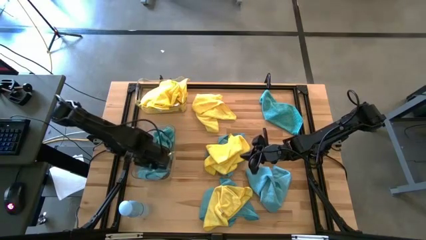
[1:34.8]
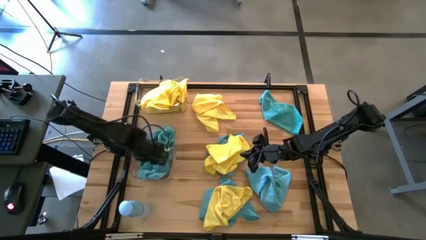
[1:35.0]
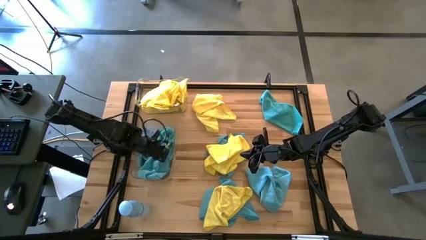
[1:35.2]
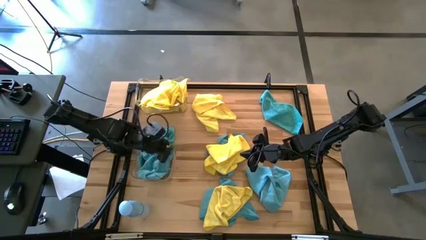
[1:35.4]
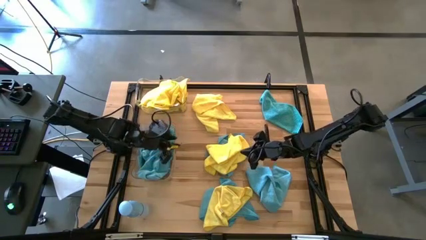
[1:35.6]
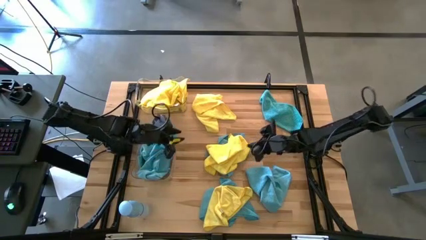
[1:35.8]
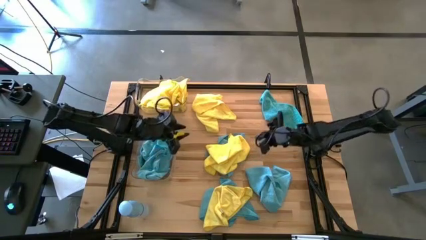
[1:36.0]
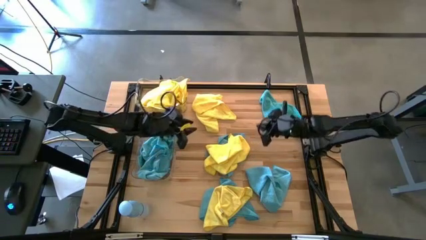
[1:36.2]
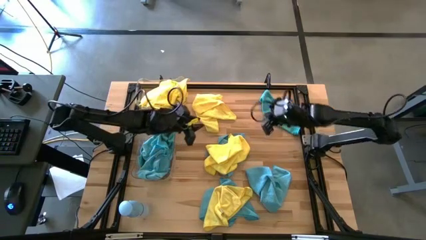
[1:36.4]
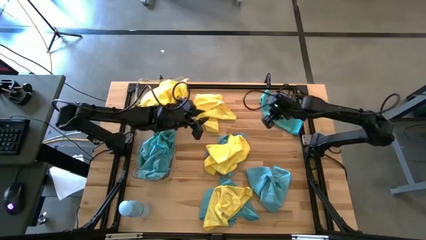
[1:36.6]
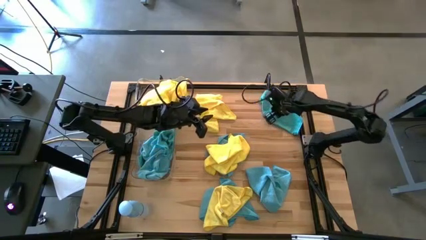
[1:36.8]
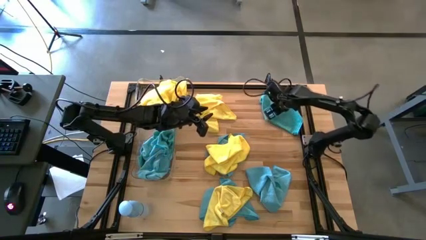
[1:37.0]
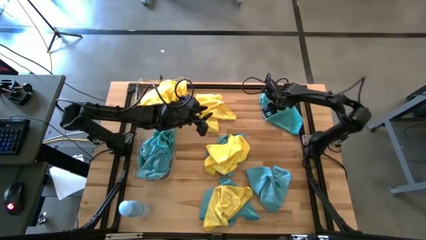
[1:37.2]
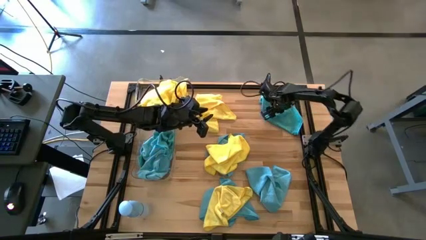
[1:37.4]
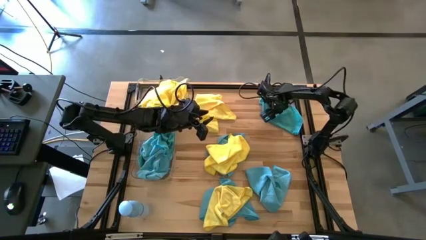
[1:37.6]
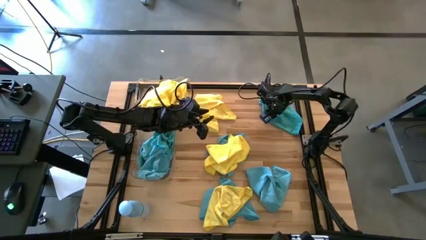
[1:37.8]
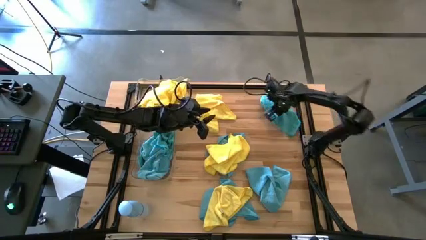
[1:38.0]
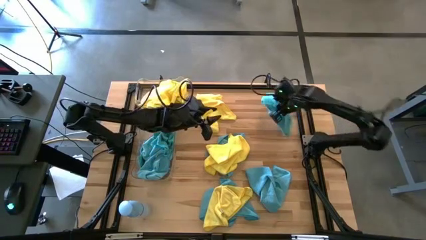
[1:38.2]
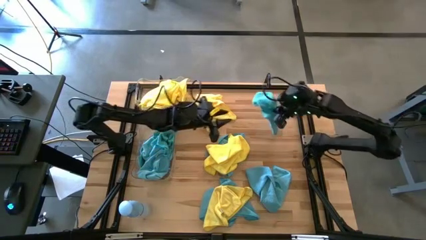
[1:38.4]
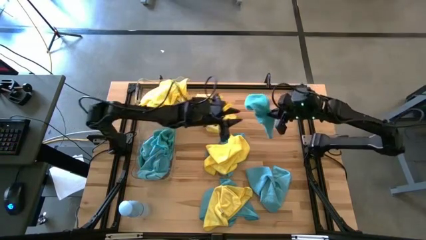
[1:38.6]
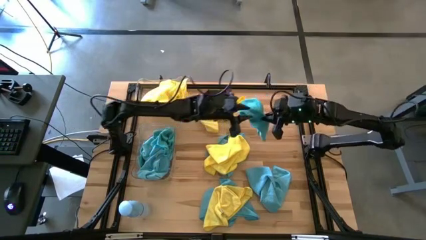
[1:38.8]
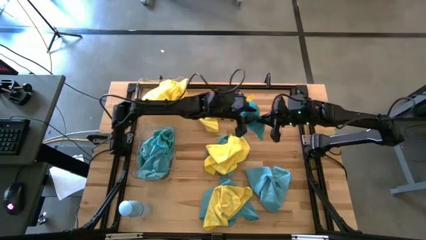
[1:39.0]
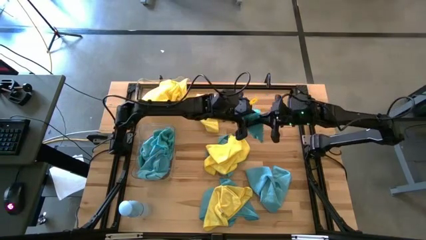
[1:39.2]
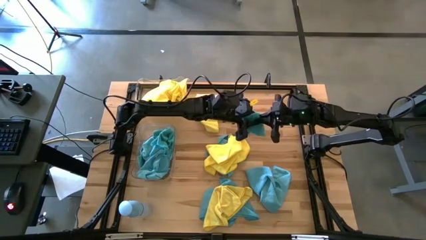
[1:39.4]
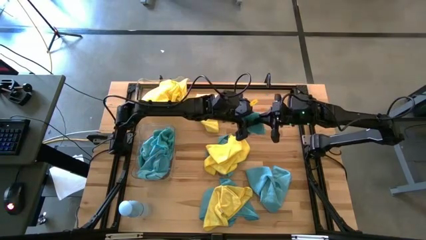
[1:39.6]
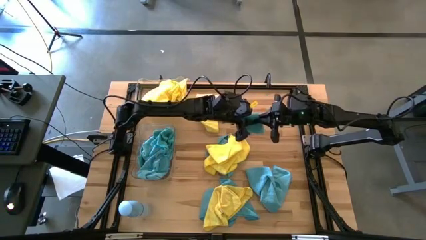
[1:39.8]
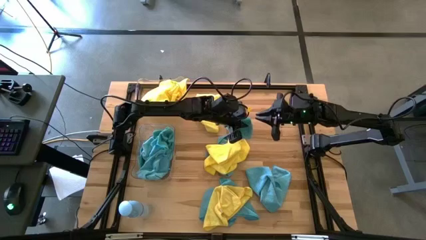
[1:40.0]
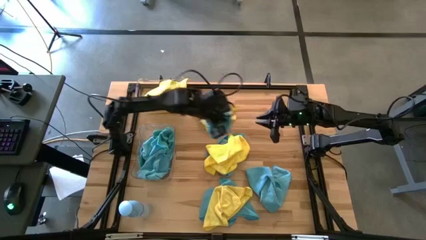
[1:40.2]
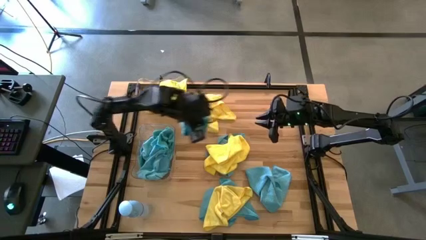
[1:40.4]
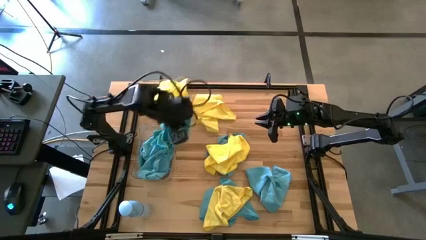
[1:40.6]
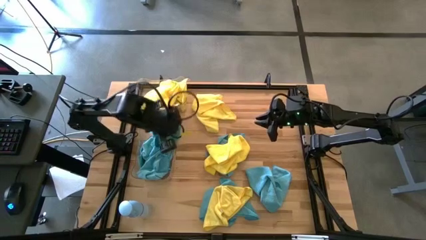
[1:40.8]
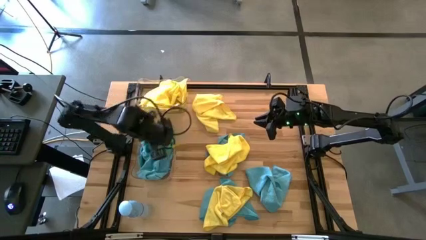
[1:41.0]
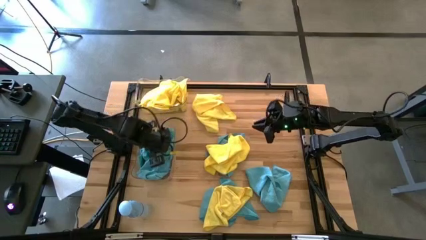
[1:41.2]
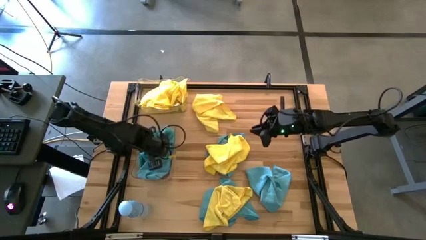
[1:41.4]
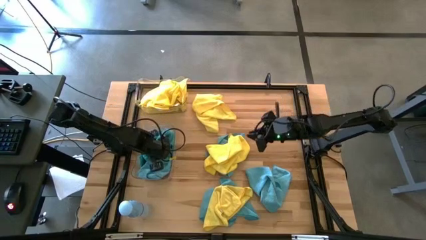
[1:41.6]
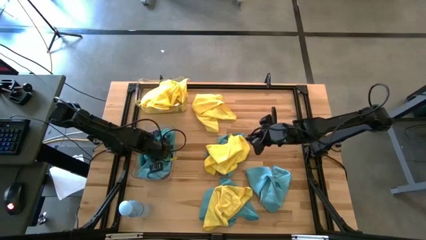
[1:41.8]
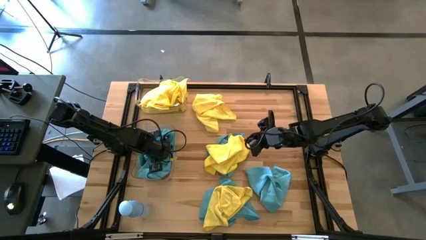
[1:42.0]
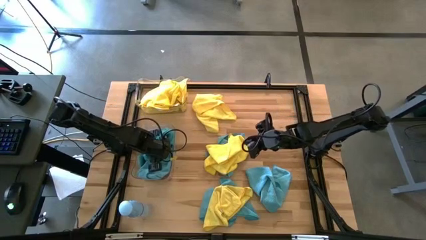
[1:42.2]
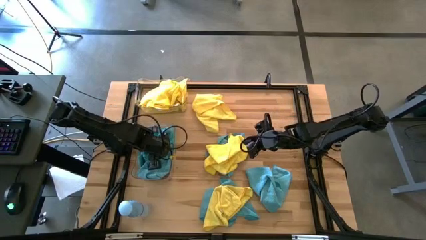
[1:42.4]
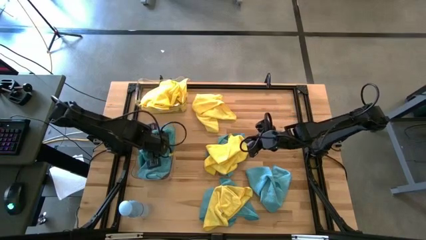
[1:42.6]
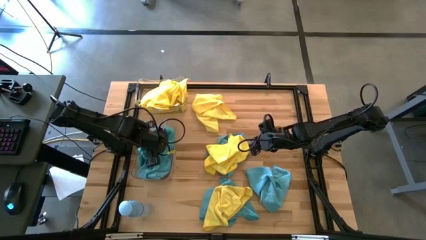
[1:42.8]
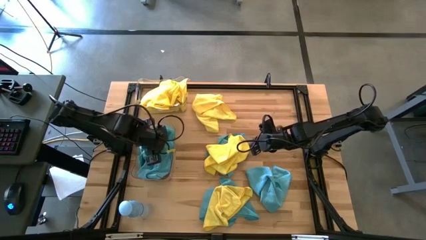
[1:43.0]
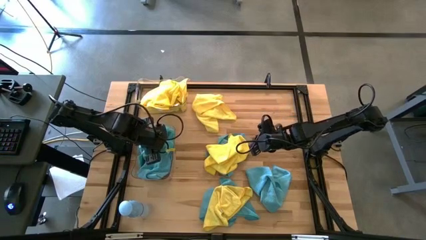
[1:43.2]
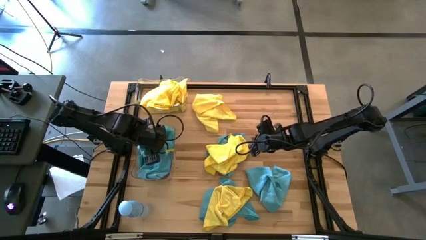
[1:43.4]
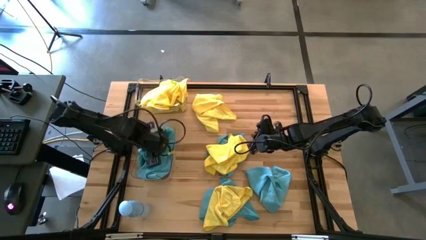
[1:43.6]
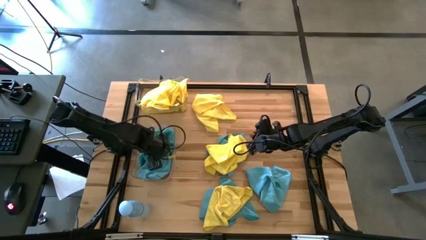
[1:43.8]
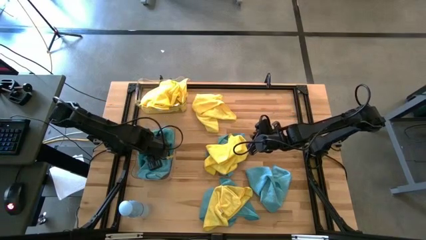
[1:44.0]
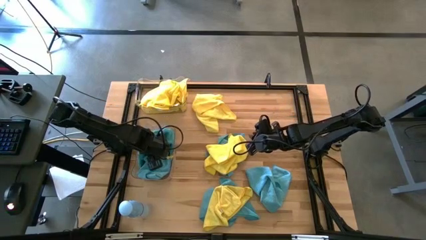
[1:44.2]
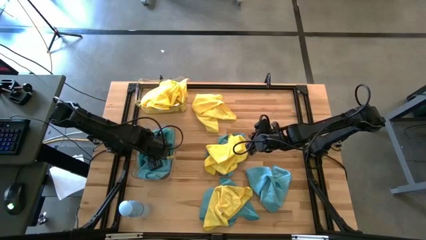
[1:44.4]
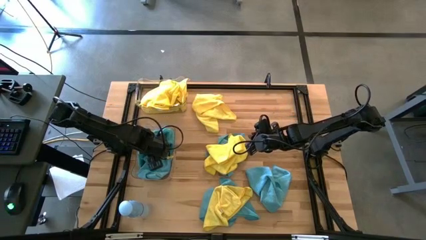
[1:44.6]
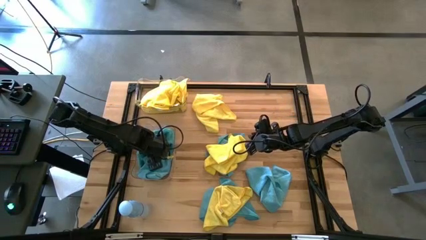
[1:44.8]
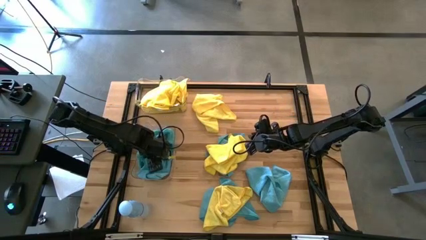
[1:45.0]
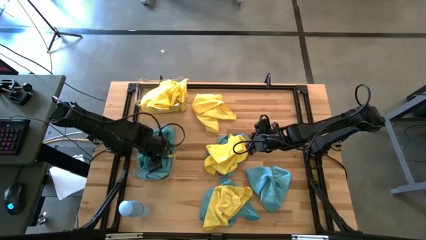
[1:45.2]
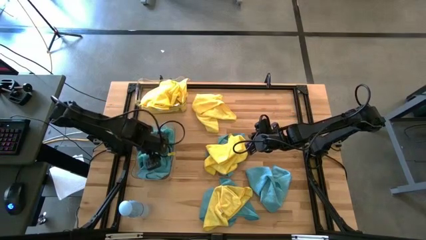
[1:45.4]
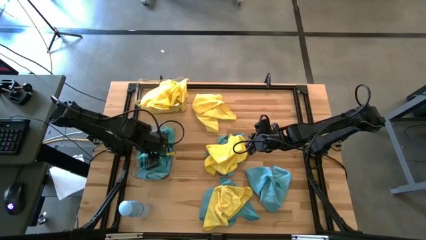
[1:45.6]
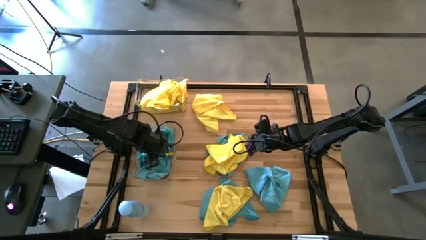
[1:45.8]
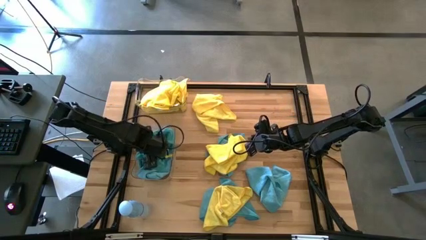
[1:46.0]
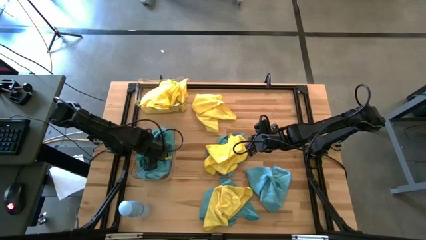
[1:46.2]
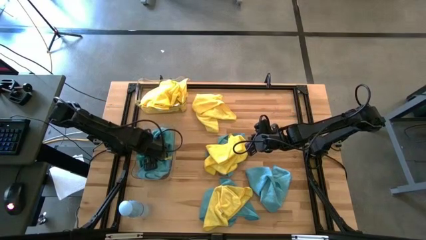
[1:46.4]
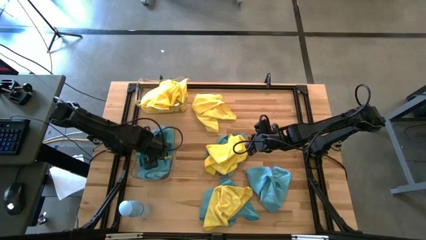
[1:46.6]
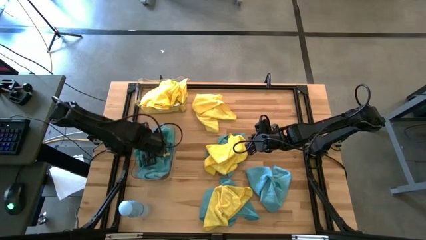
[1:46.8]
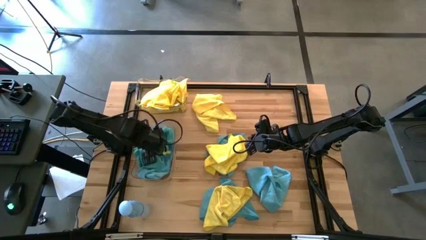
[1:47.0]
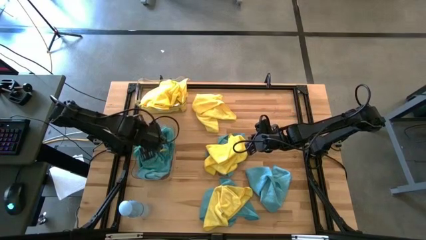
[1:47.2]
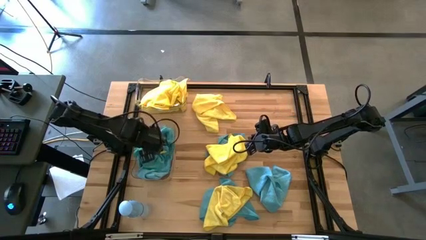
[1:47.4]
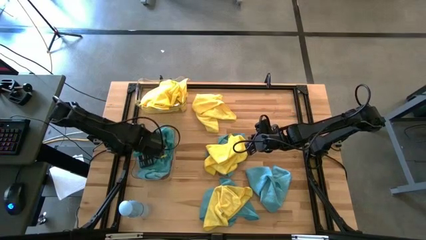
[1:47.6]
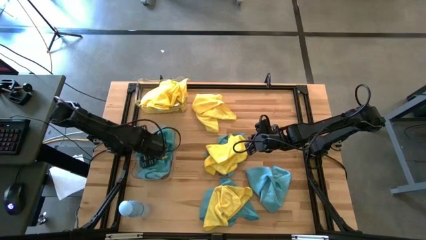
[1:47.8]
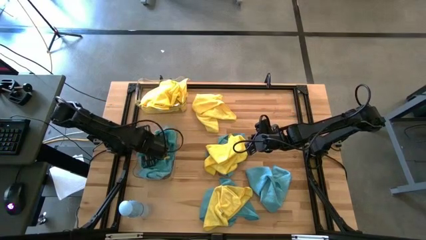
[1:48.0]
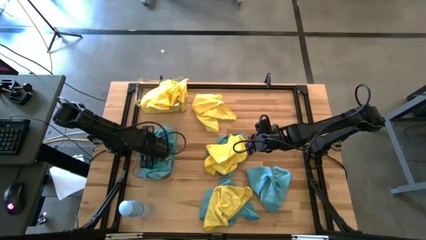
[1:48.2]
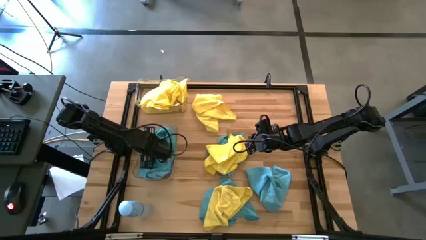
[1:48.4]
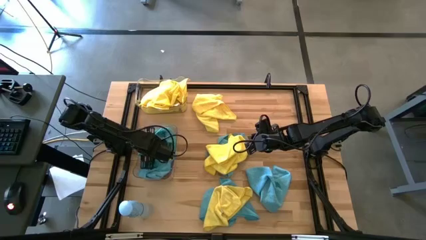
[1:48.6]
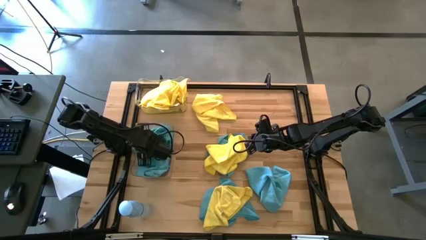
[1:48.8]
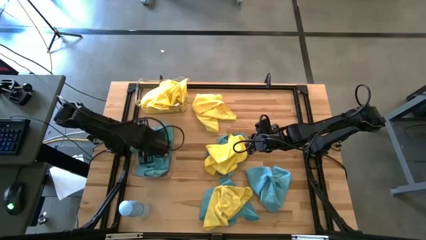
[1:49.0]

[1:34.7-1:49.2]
Task: Sort microfiber towel by color & place in baskets
Put the blue microfiber cloth into the bottom transparent bin
